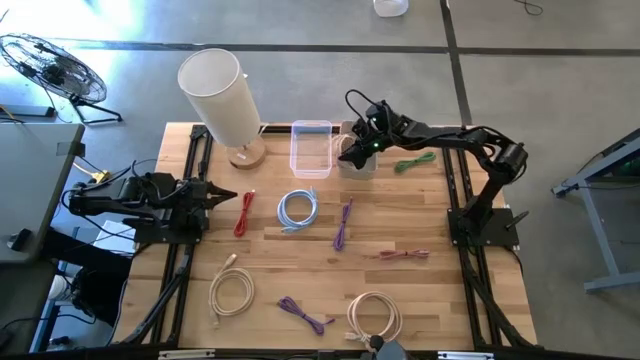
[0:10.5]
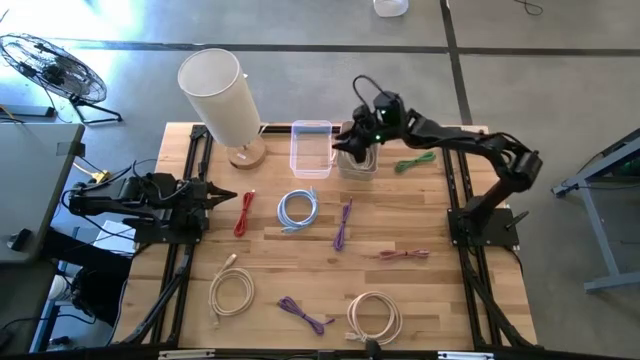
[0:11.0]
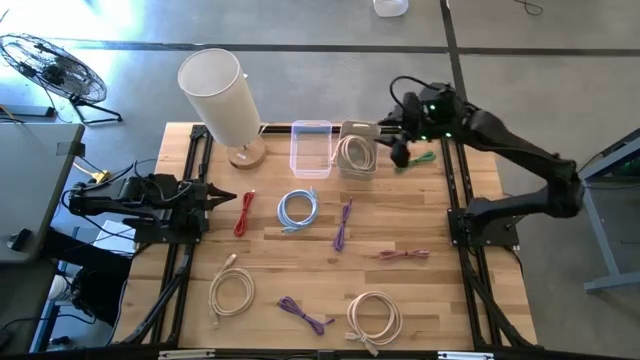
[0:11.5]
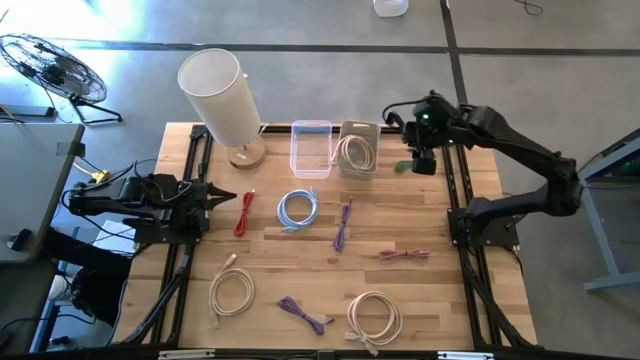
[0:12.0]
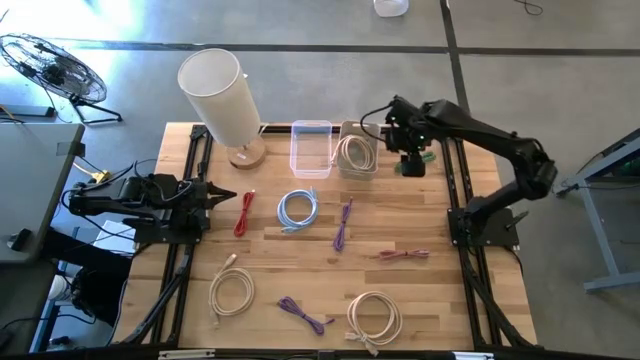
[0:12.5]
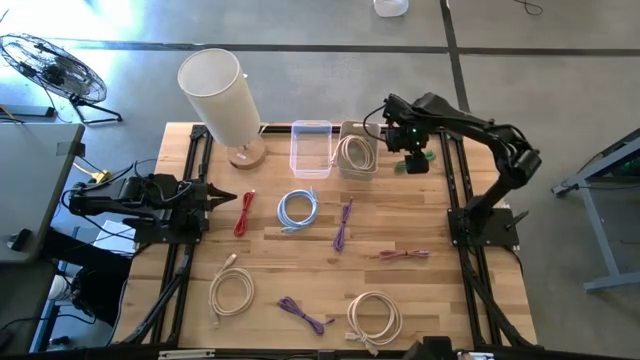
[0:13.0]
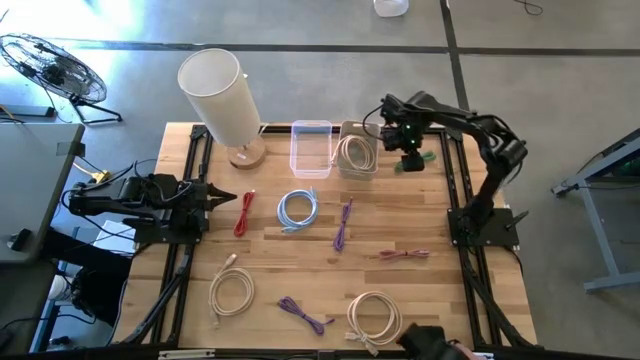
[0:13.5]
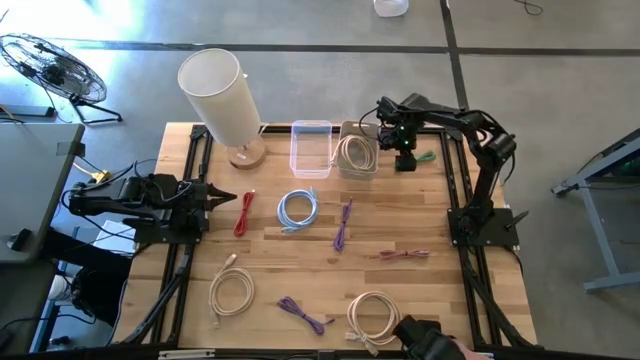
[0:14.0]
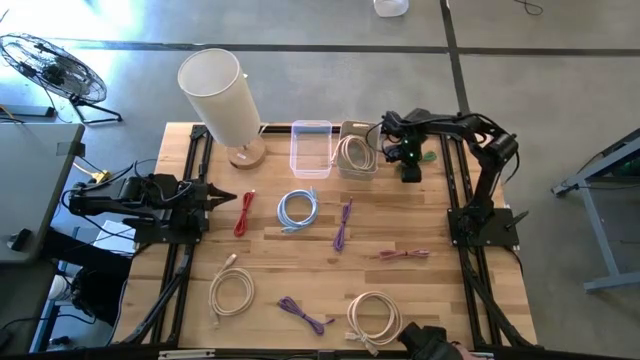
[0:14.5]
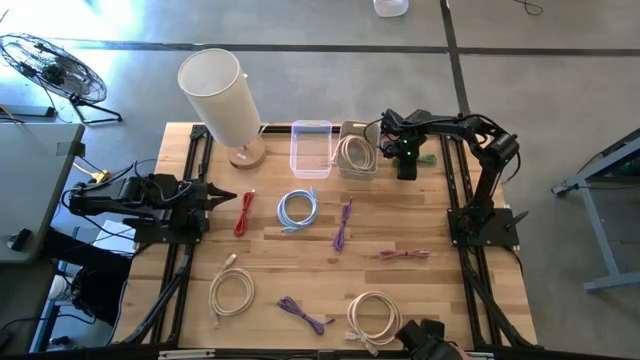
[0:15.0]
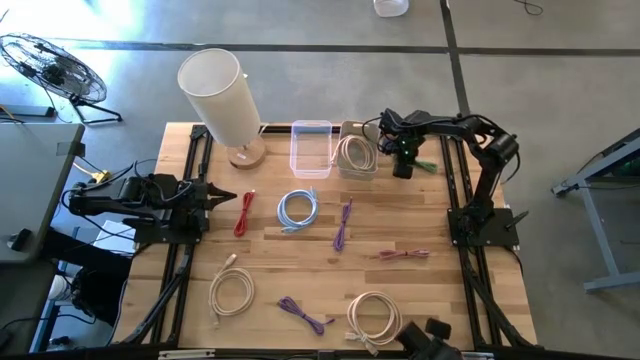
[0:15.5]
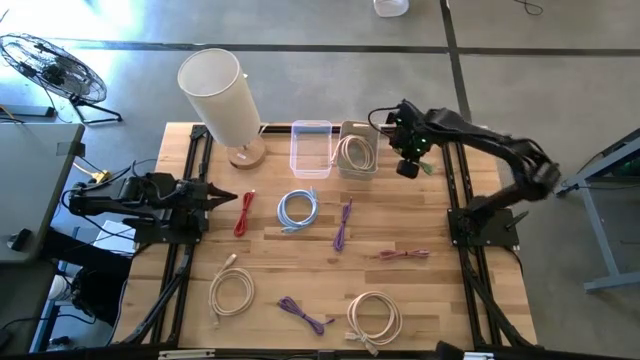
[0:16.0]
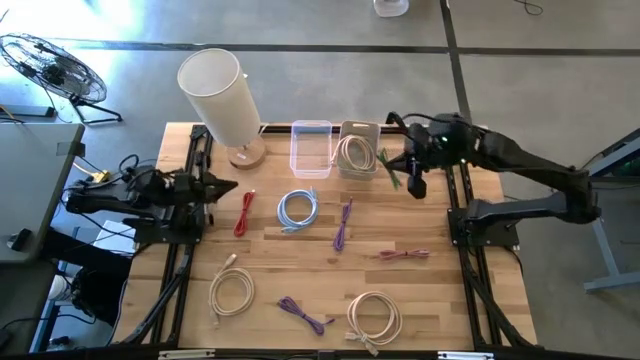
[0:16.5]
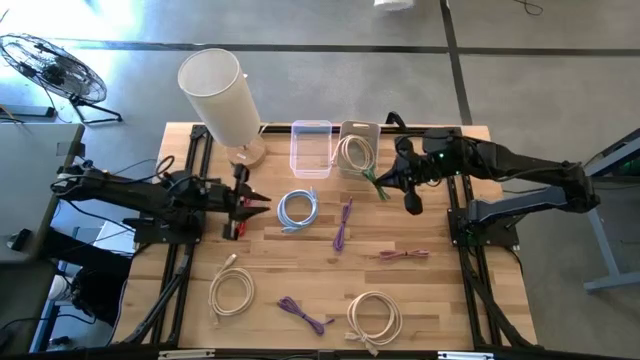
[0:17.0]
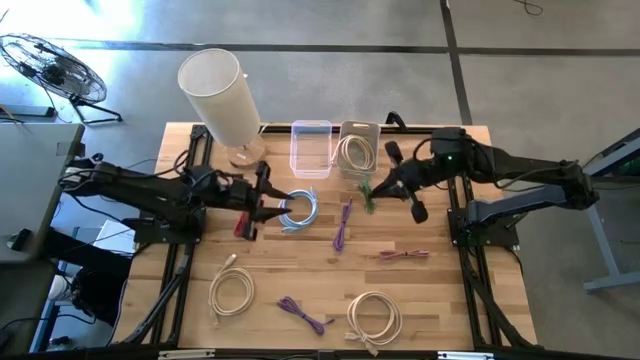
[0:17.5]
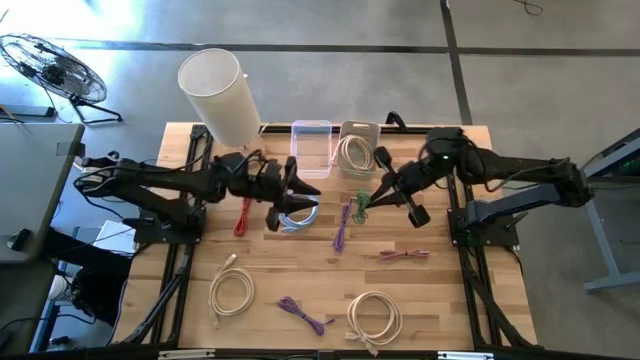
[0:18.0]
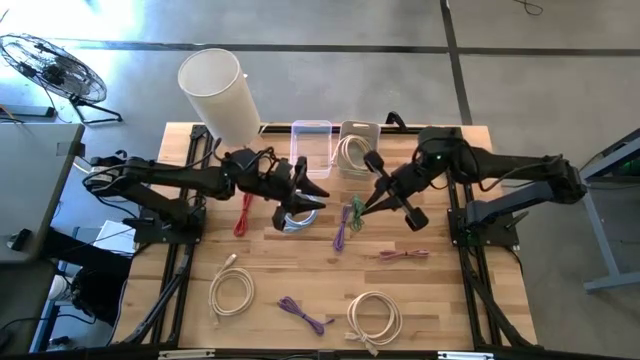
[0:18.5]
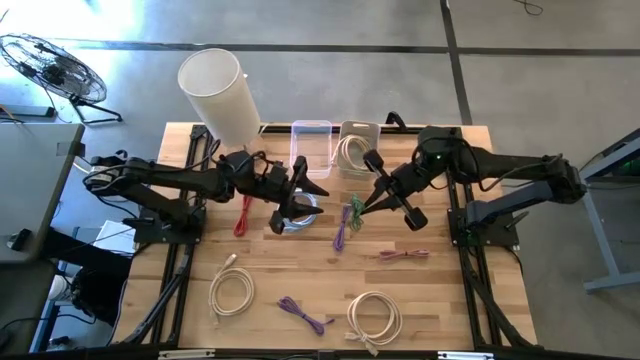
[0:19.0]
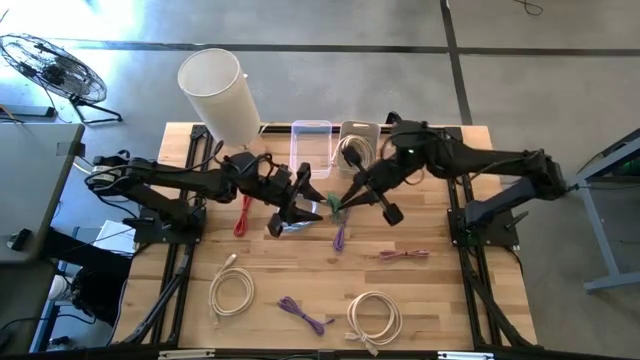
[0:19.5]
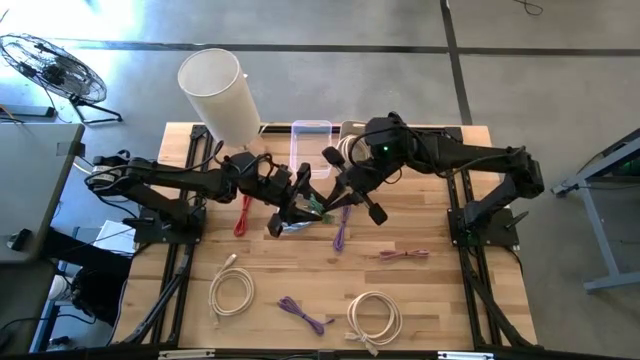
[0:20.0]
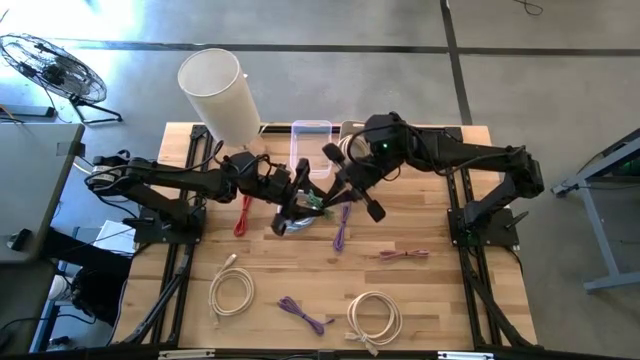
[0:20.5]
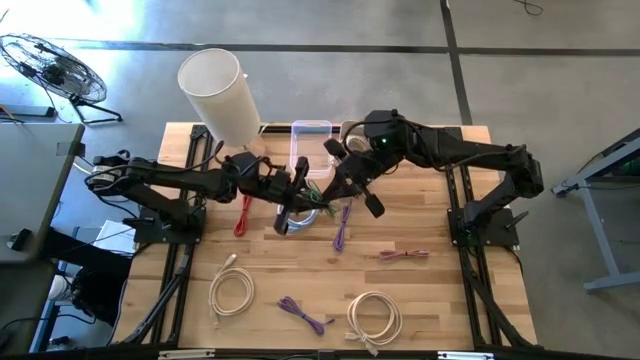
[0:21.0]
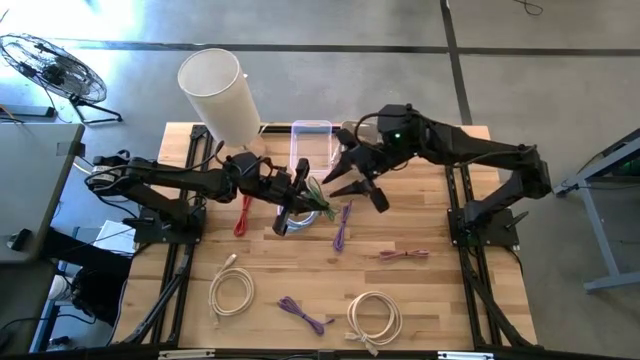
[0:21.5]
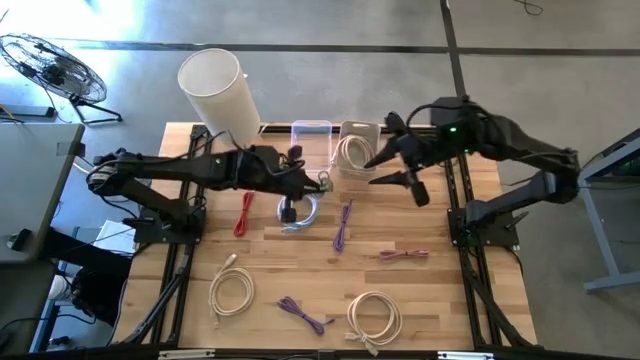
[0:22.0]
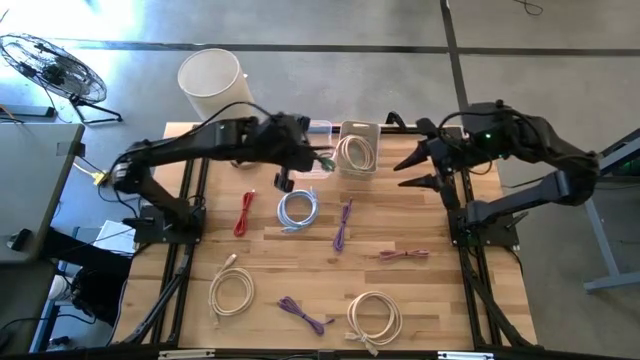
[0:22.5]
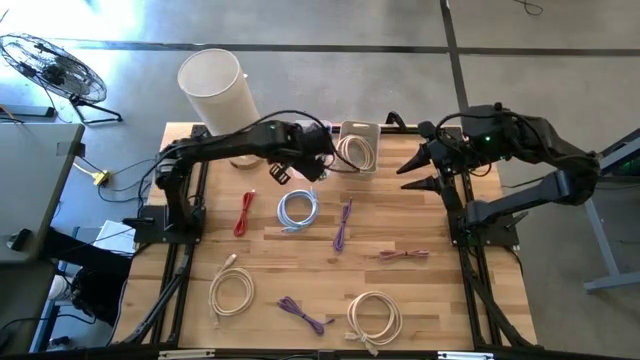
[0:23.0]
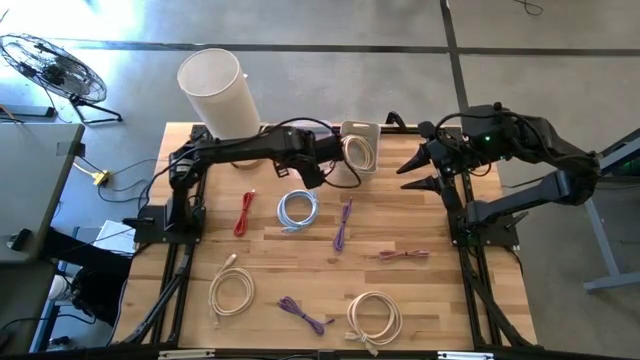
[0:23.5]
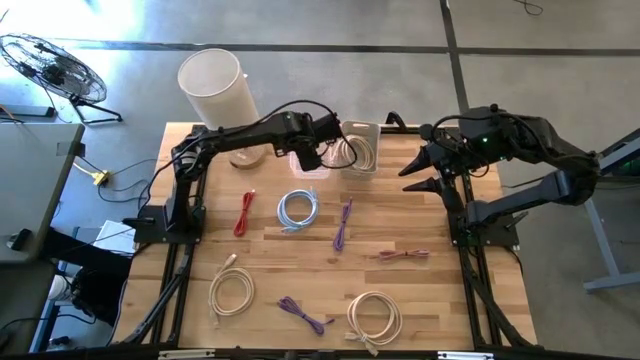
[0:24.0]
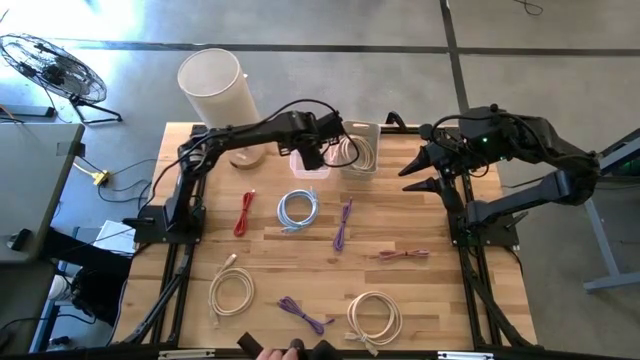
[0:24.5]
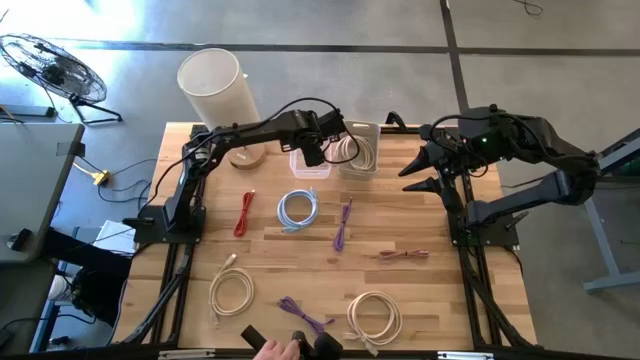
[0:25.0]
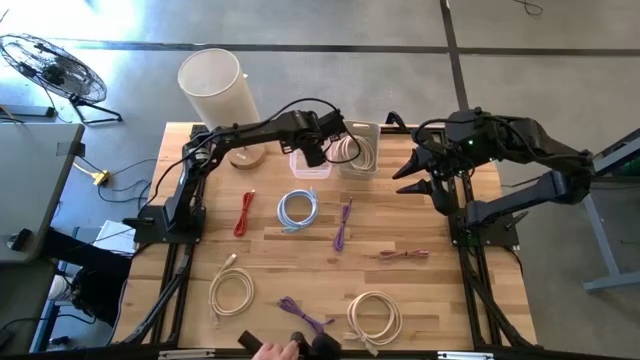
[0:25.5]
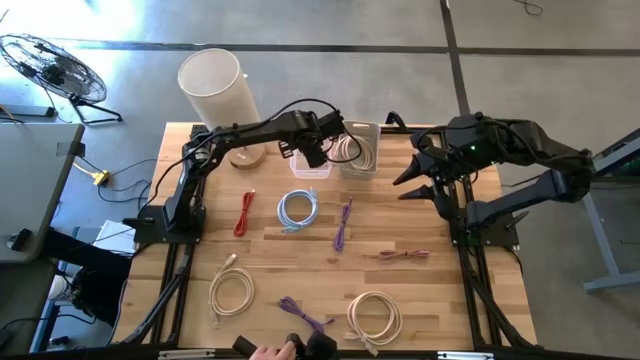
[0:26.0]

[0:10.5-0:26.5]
Task: Pick & Place USB Port
Put the green charger cable into the transparent bin

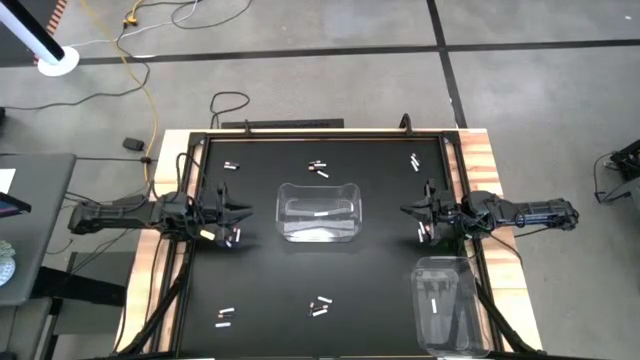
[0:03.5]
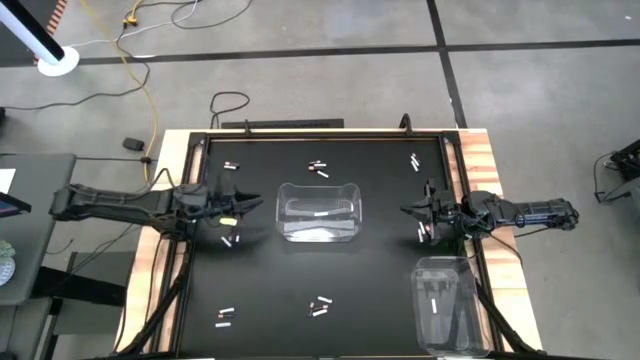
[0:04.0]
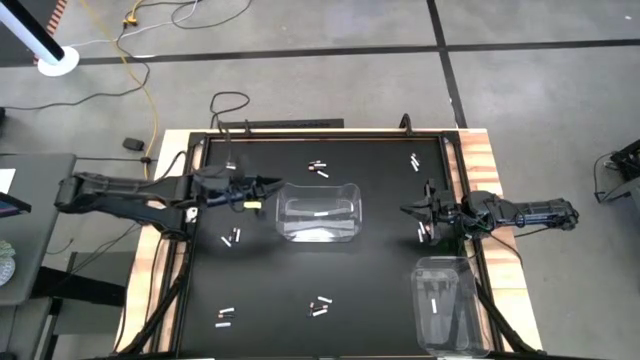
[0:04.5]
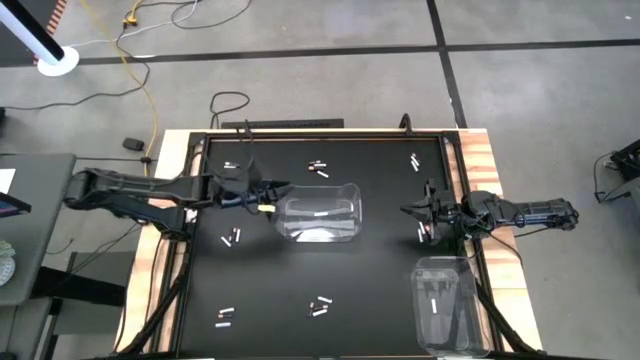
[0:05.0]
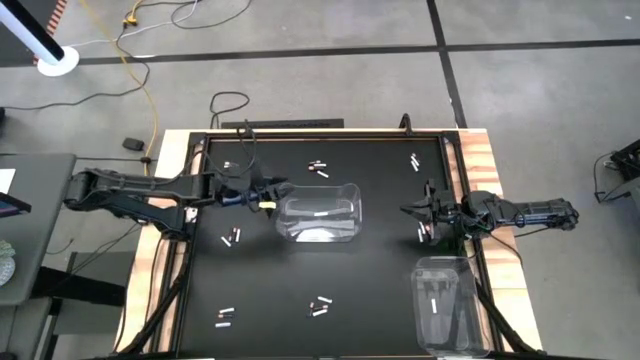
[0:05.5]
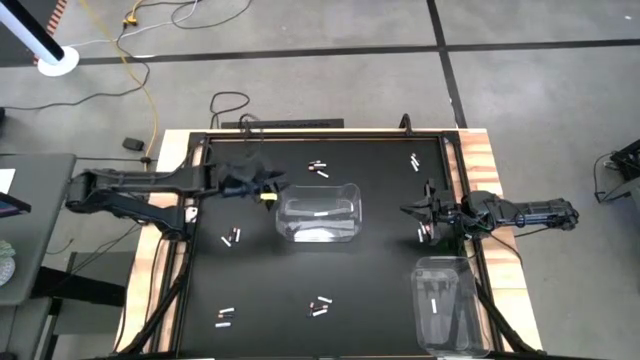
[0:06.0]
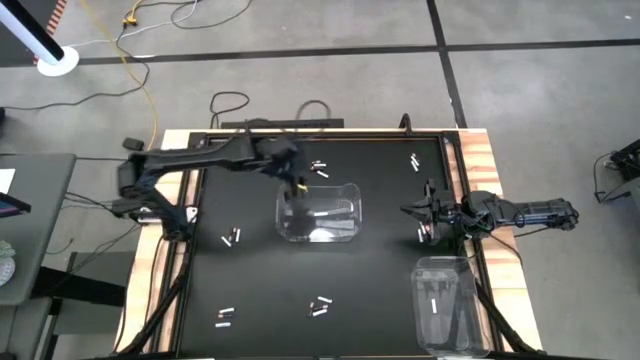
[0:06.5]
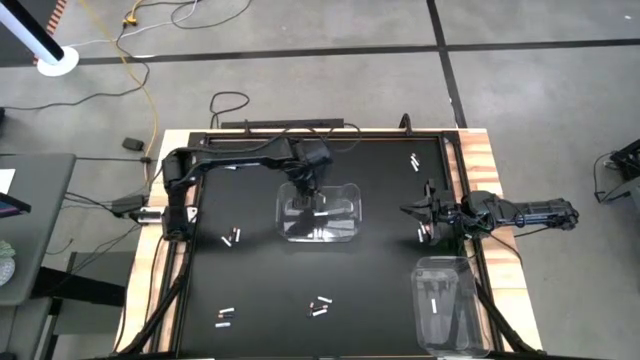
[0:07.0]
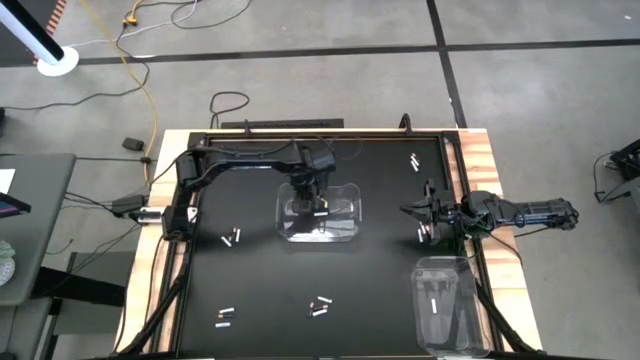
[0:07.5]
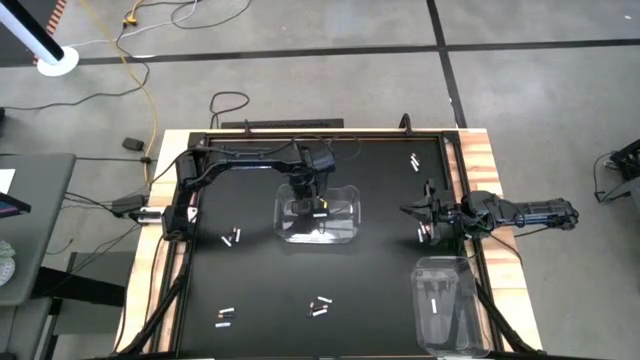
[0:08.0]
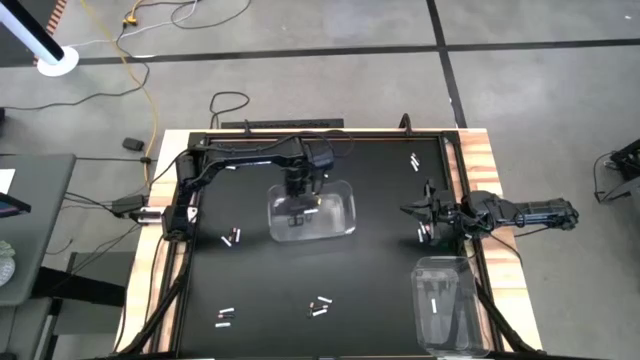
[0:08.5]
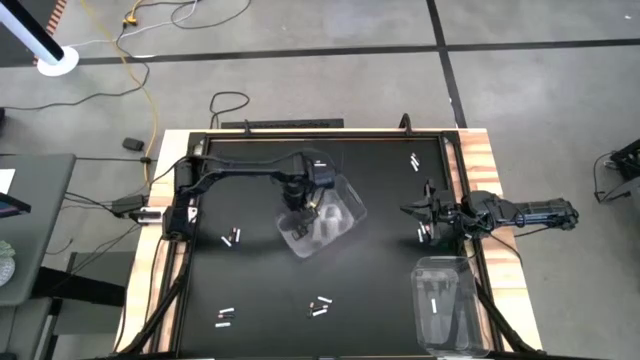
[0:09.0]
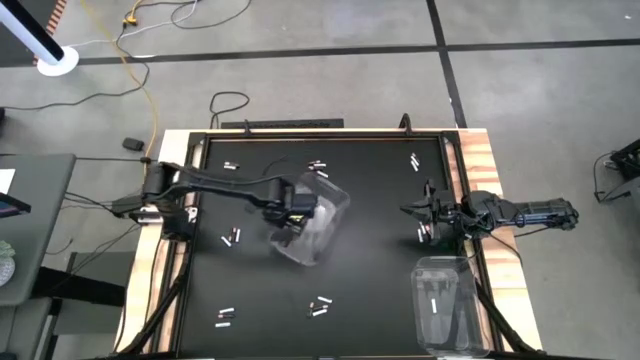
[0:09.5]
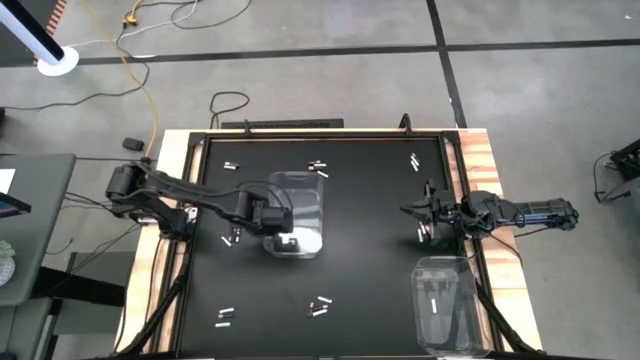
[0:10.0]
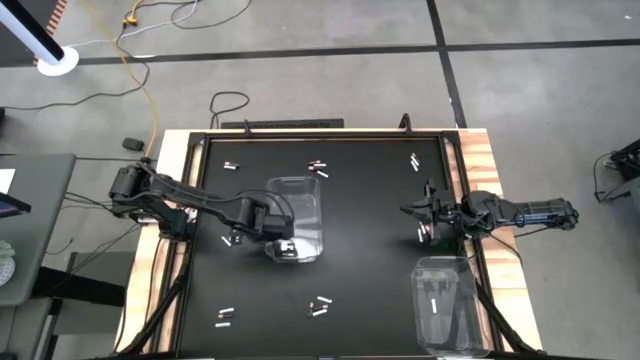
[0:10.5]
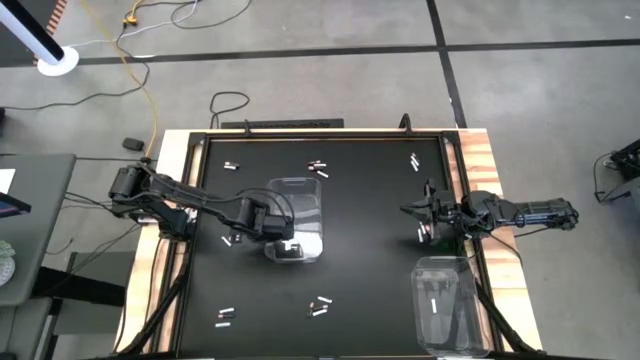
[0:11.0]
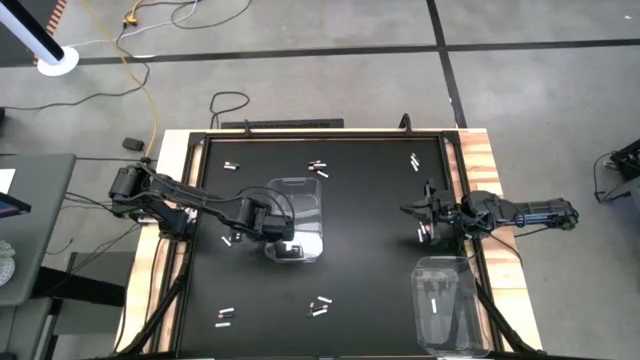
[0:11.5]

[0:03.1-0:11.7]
Task: Sort batteries
Adjust the top transparent bin
